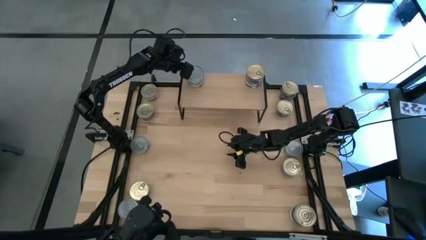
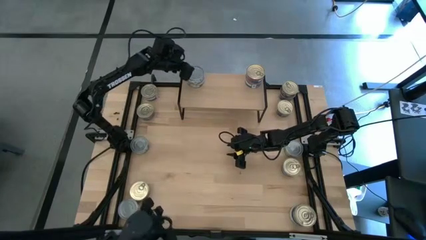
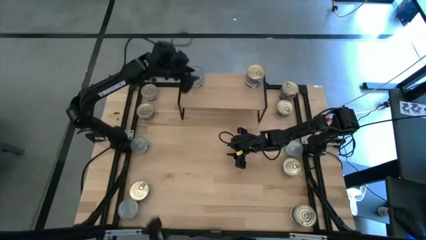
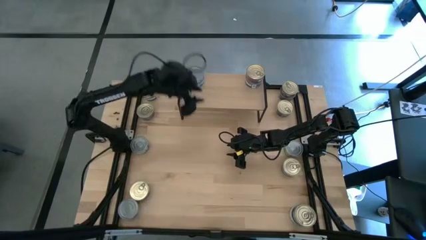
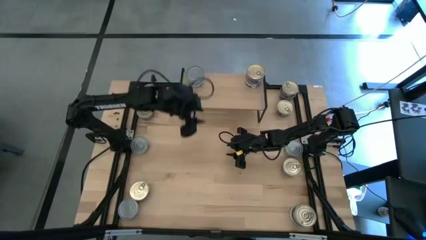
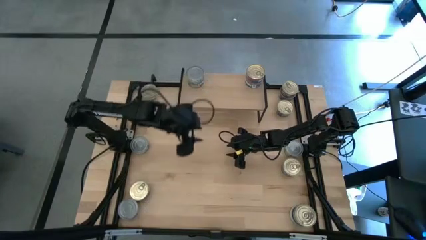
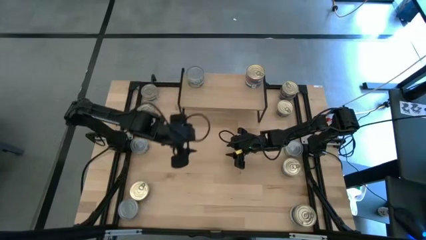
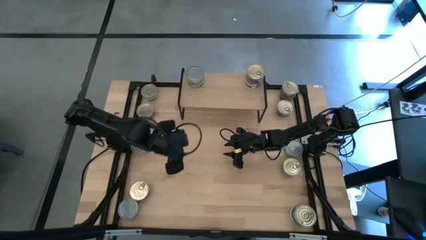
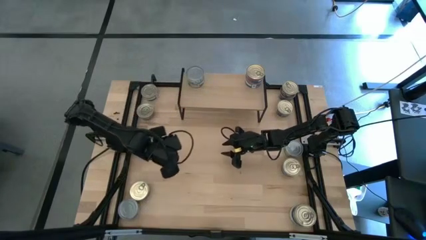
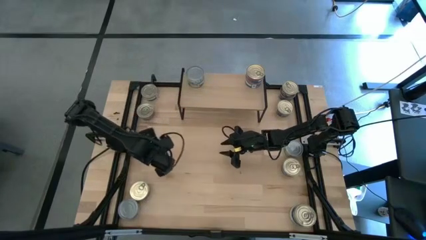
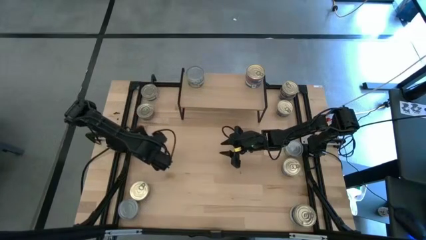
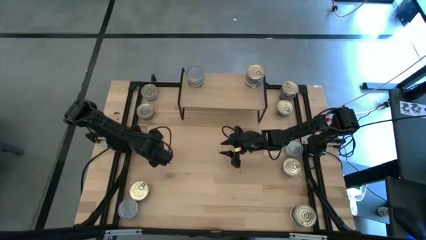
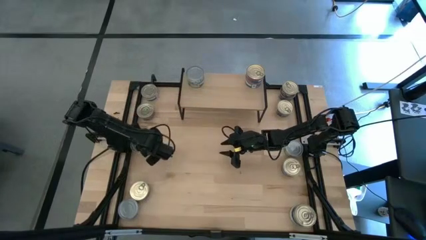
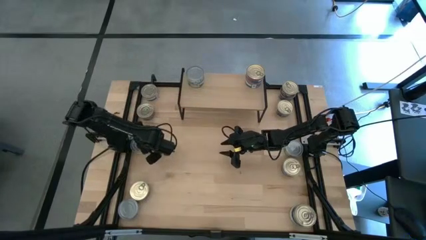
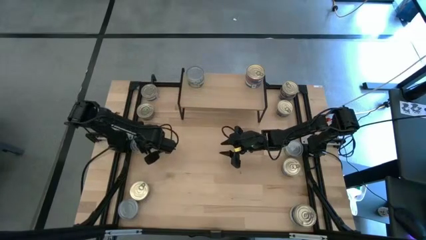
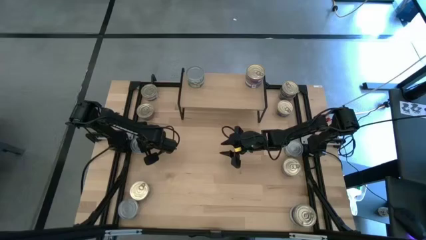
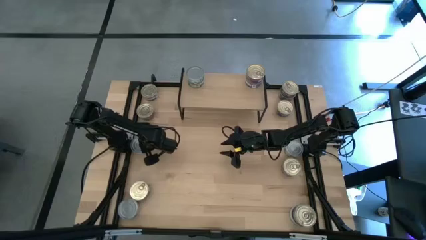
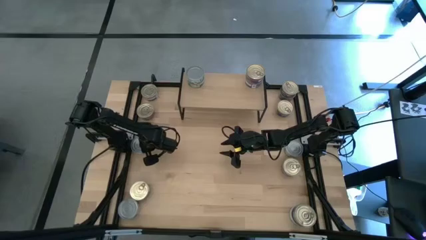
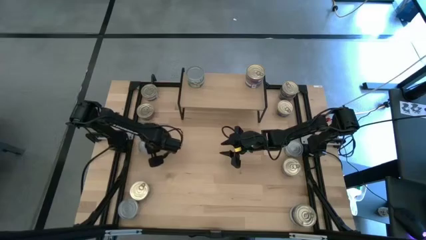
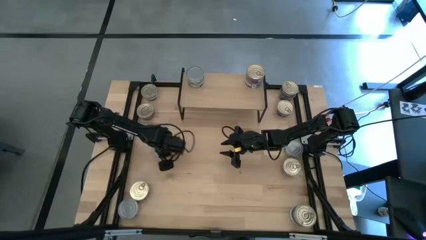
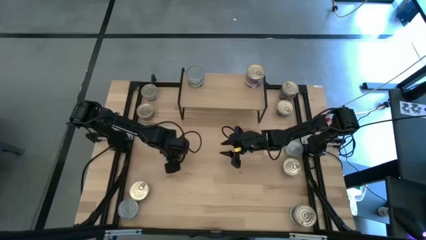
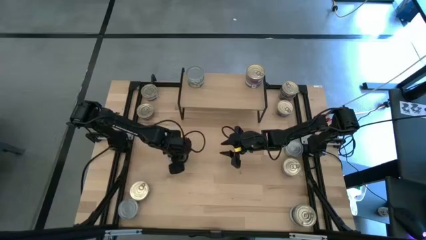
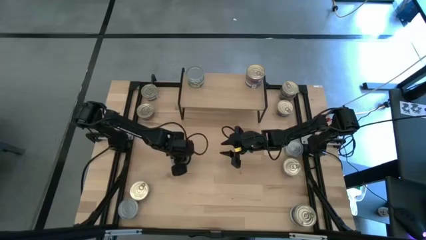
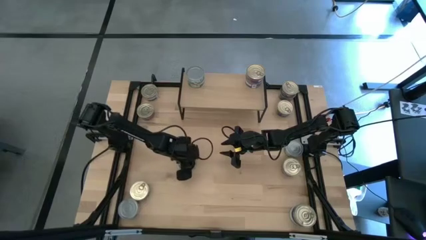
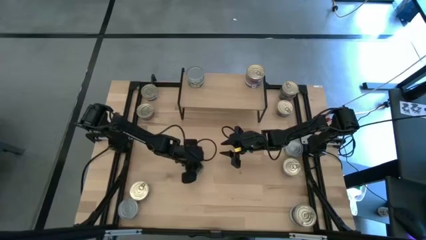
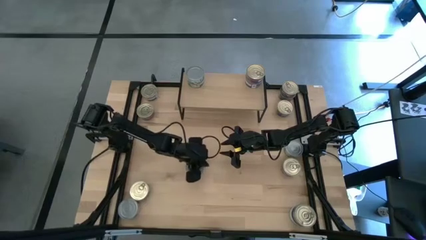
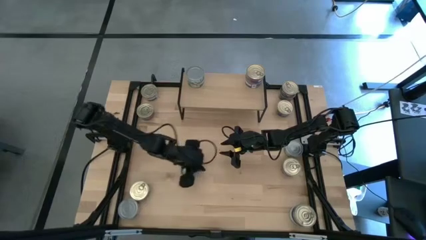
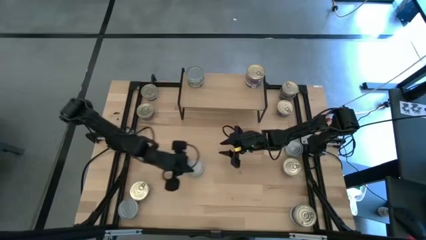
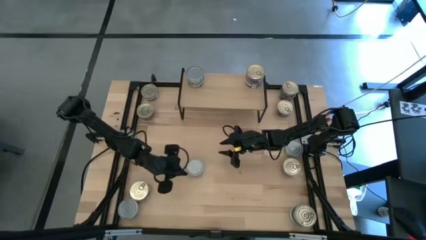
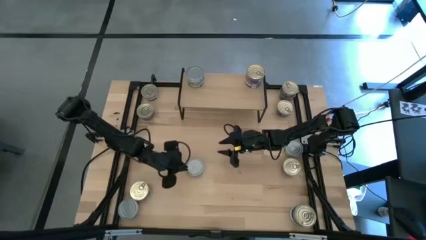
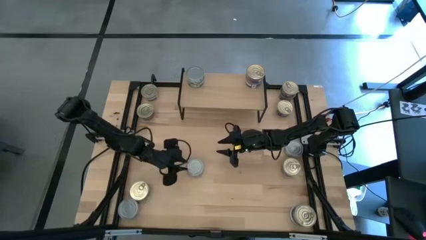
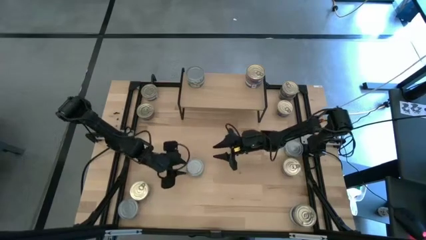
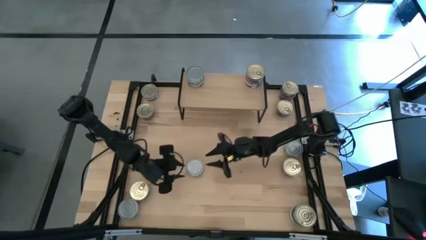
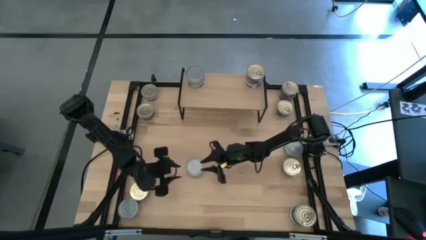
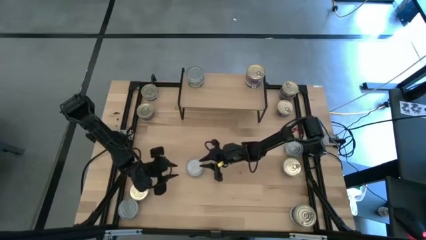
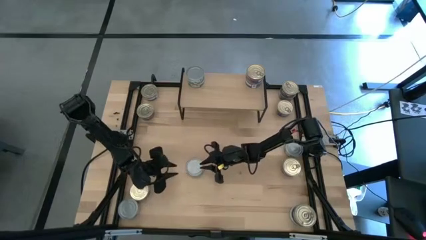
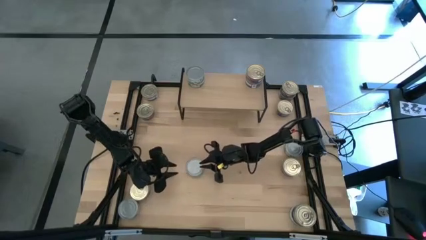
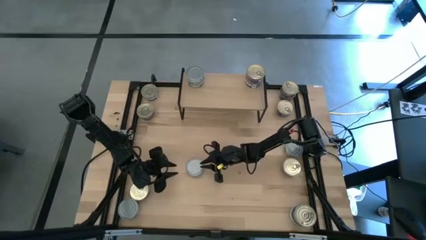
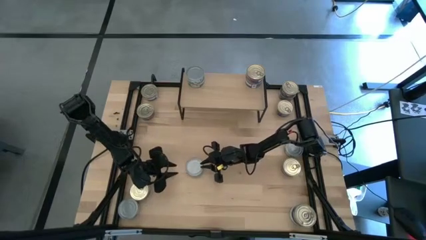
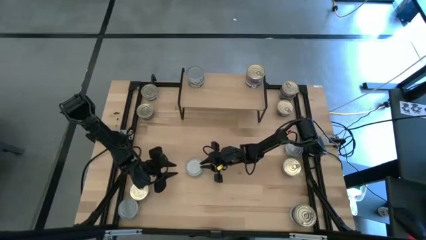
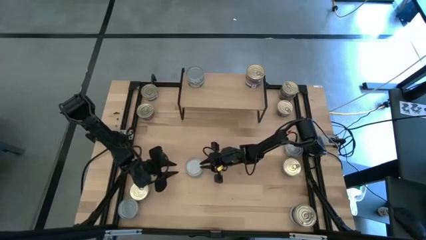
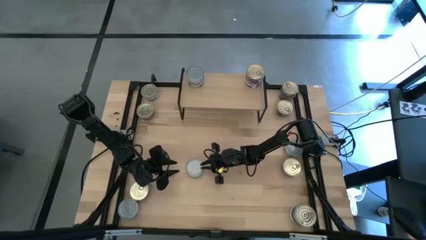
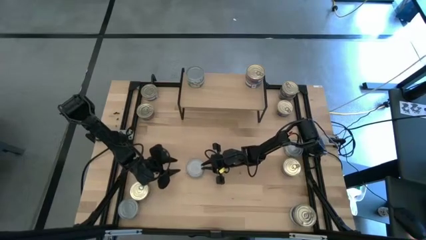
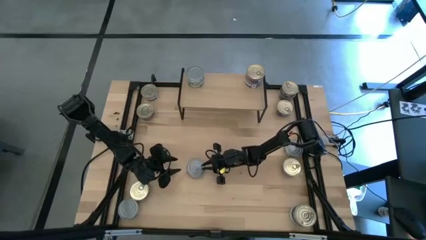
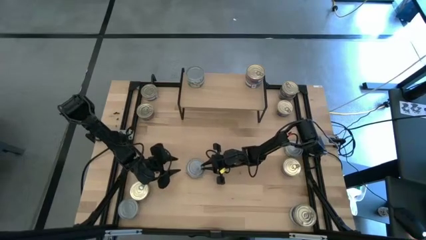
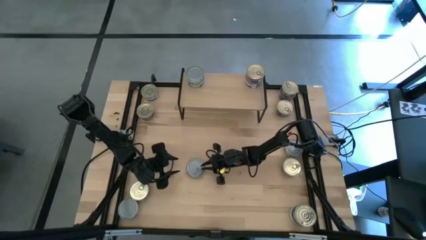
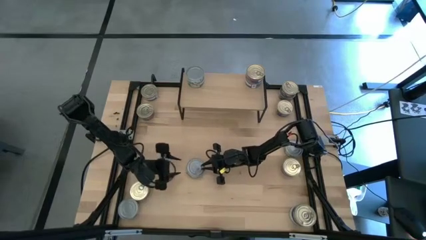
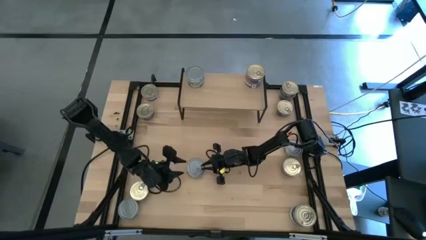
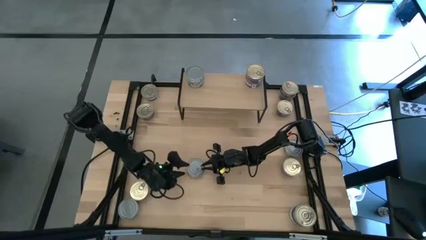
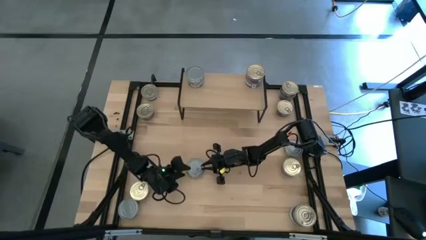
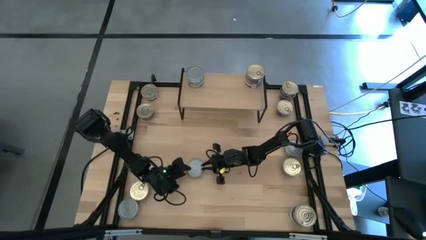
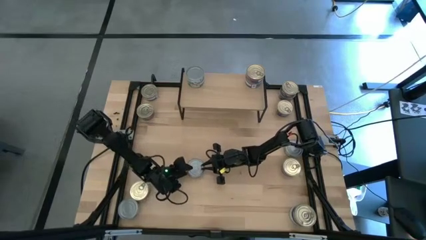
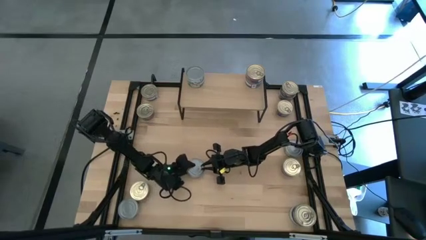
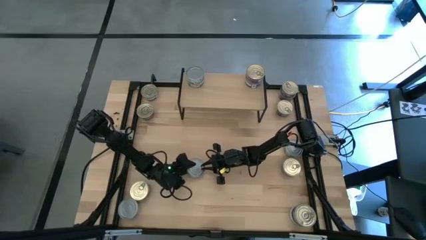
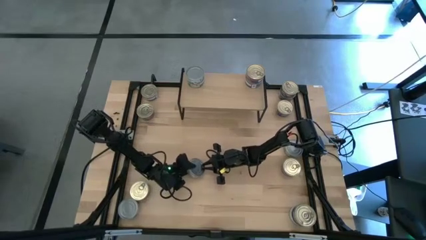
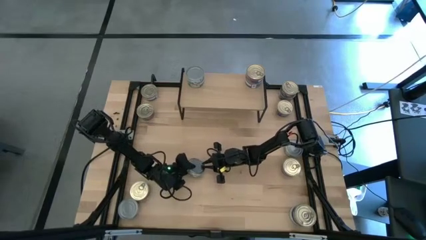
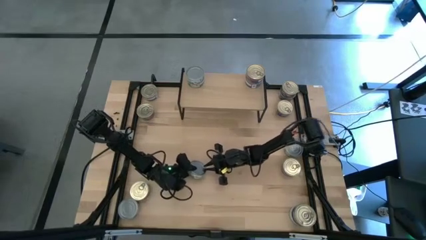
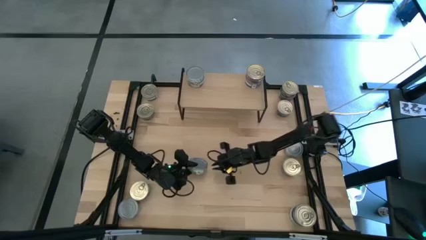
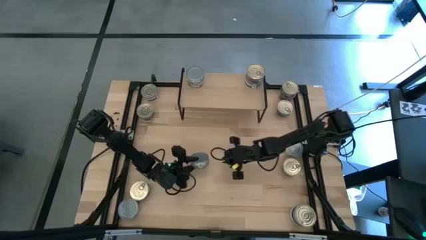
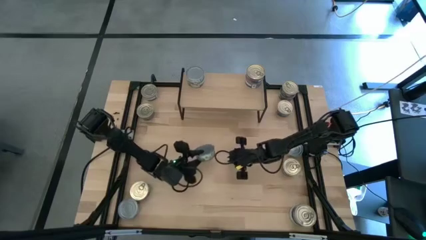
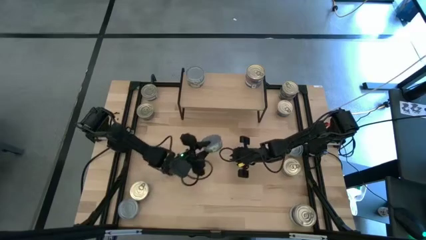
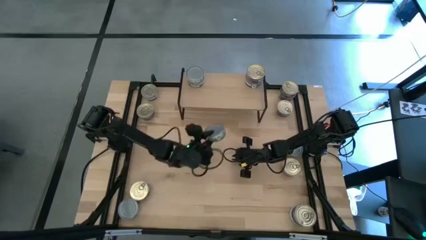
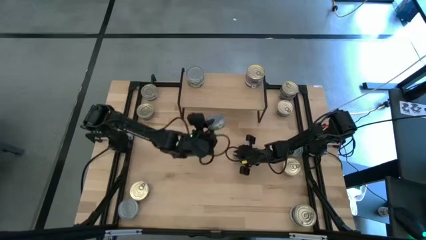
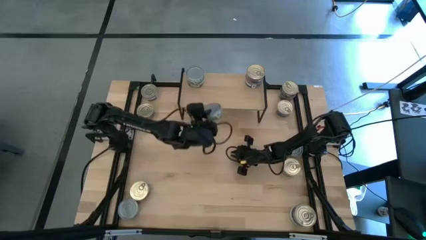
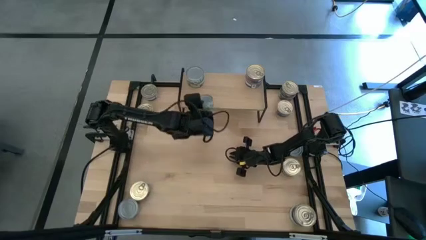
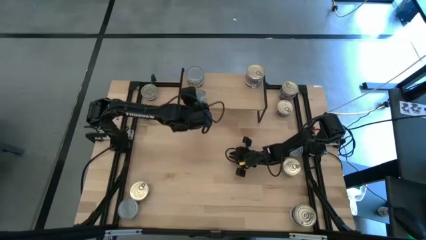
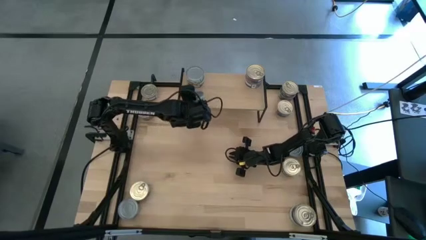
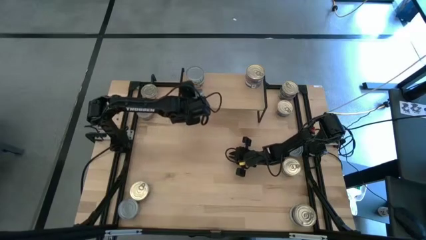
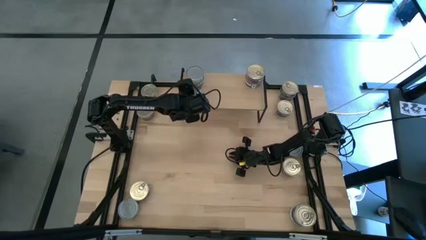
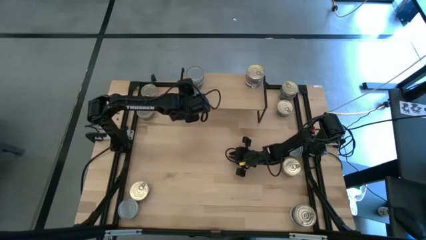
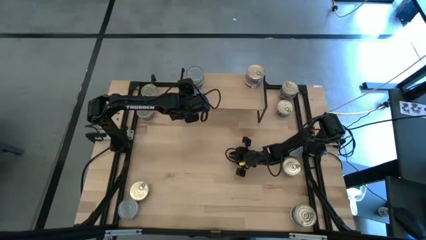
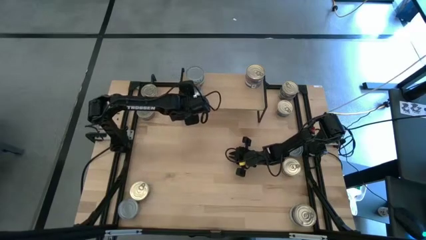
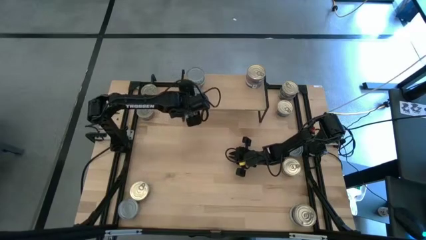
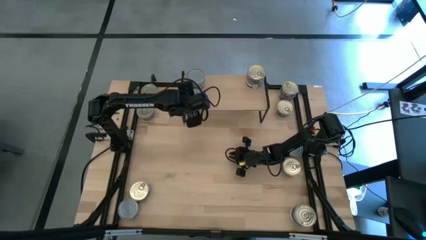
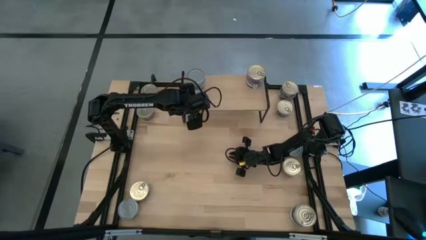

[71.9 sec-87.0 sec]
Task: Stack canned seafood by type on shelf
Put the green white tuna can on the shelf aligned with the other green white tuna can

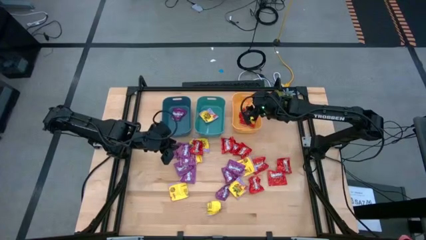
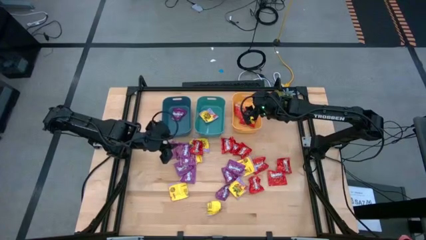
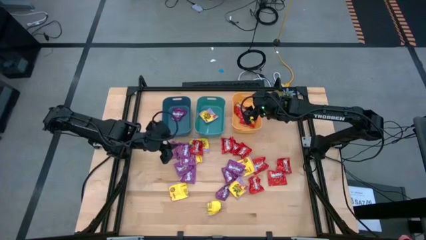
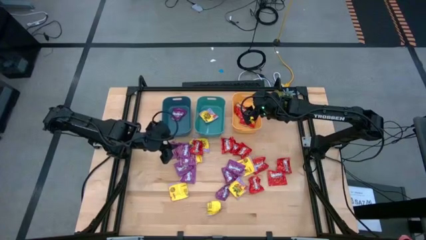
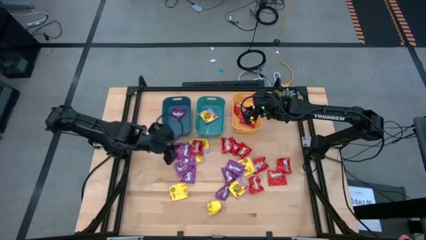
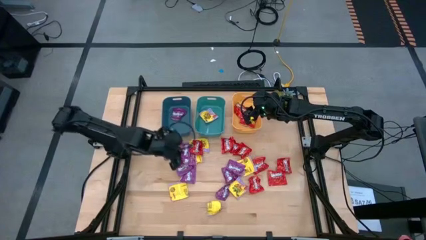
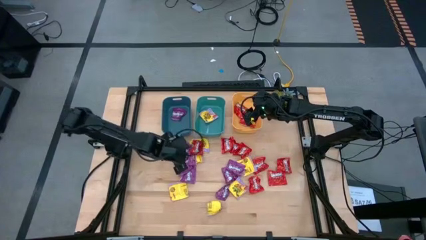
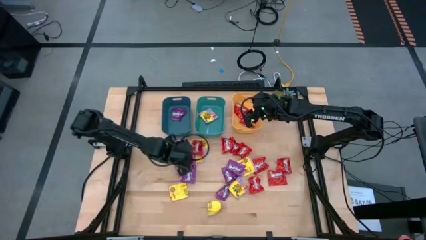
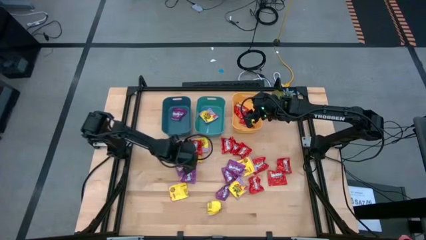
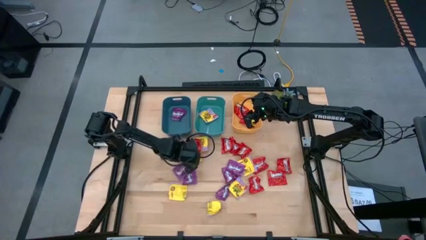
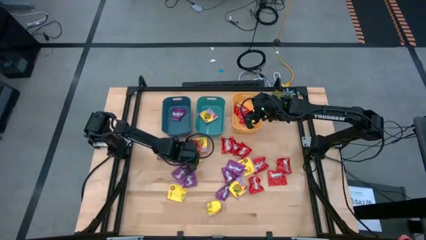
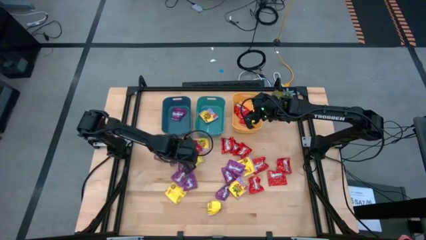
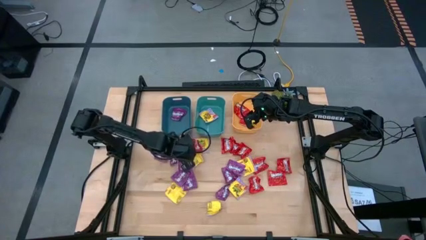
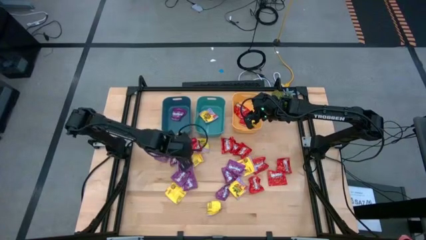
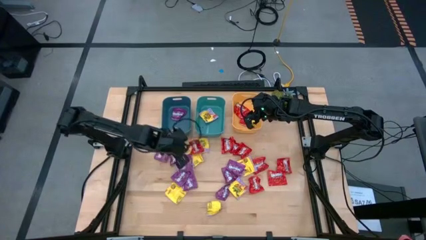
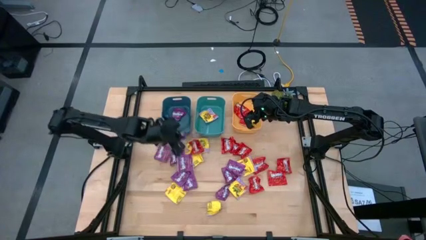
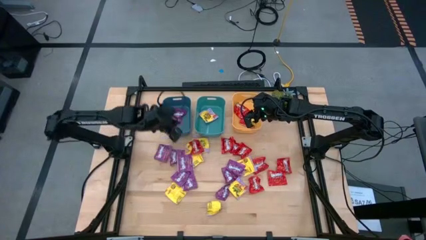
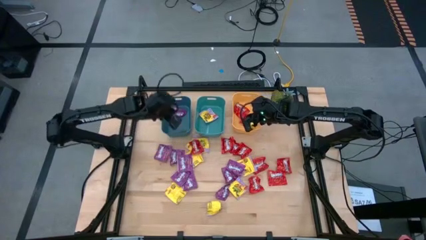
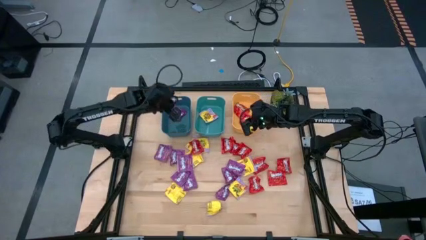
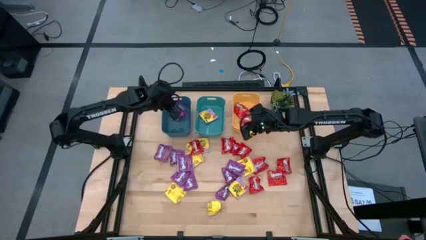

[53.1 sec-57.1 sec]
Task: Sort candy
Put the violet candy into the blue bin
